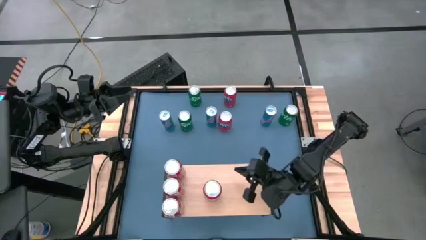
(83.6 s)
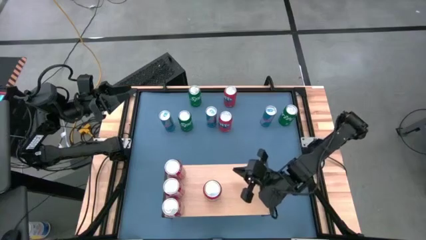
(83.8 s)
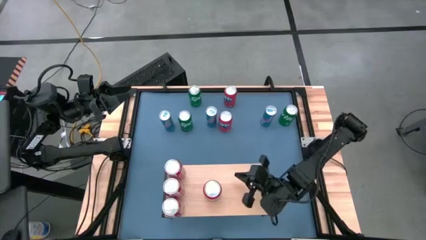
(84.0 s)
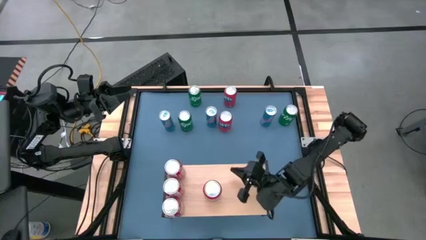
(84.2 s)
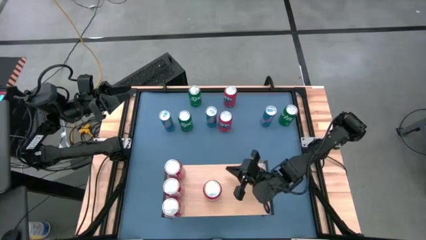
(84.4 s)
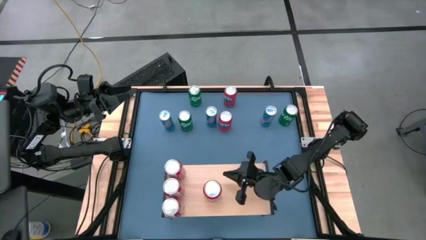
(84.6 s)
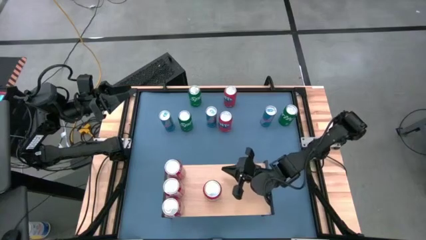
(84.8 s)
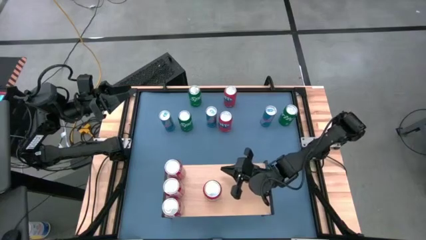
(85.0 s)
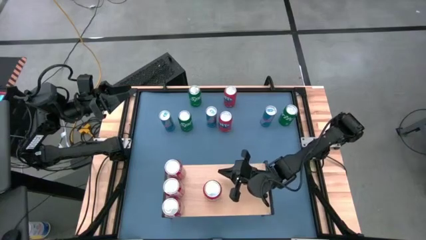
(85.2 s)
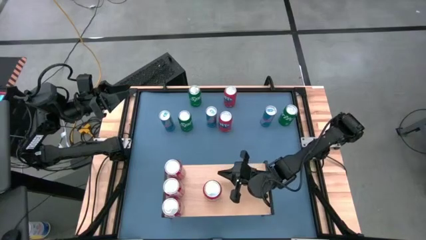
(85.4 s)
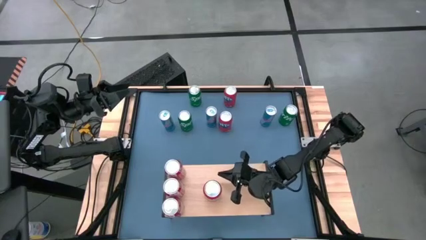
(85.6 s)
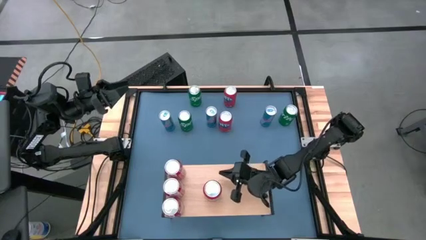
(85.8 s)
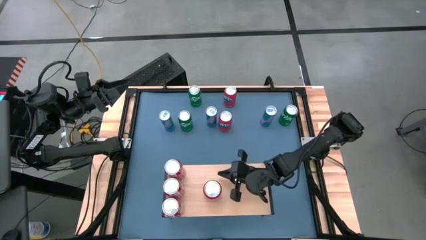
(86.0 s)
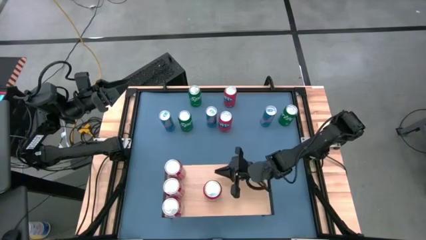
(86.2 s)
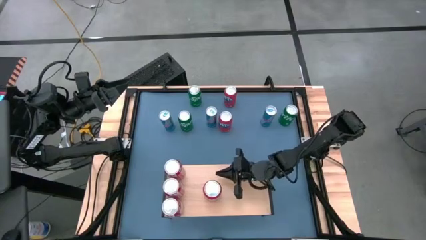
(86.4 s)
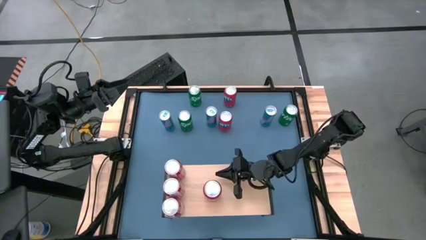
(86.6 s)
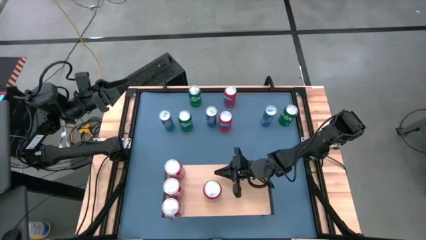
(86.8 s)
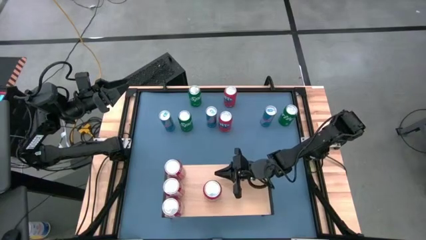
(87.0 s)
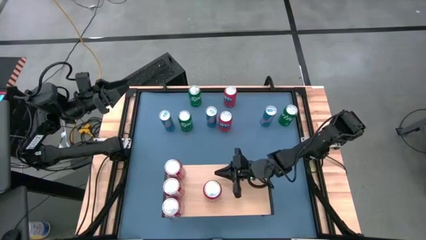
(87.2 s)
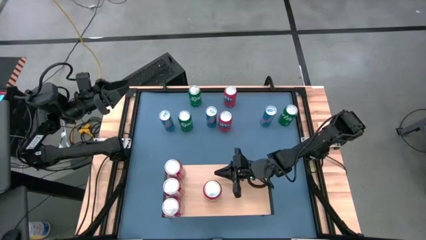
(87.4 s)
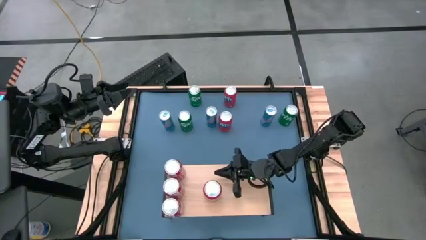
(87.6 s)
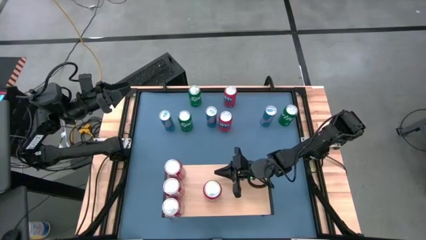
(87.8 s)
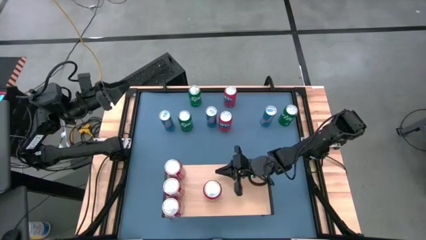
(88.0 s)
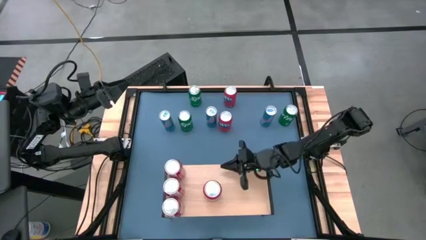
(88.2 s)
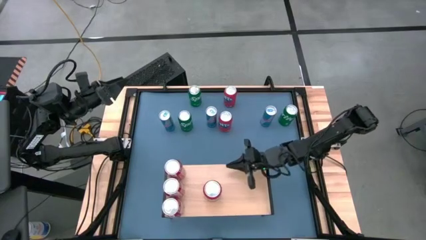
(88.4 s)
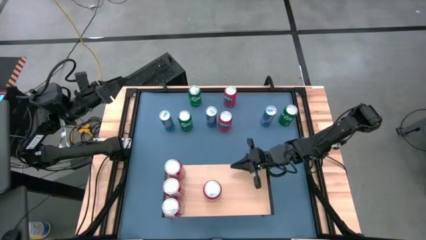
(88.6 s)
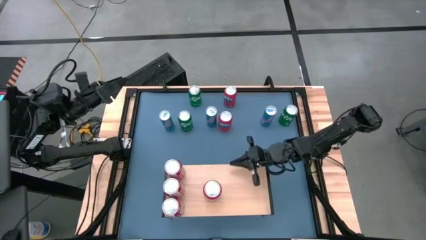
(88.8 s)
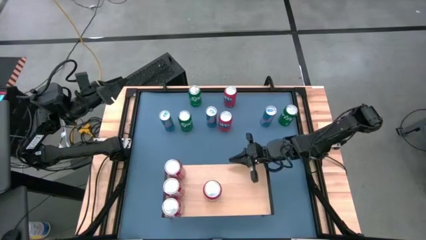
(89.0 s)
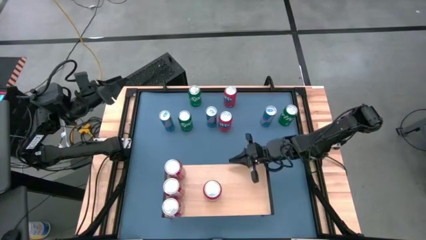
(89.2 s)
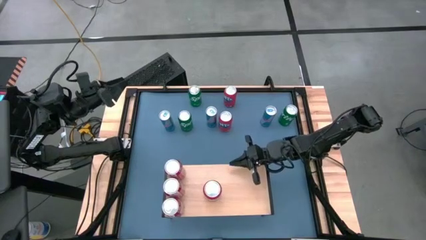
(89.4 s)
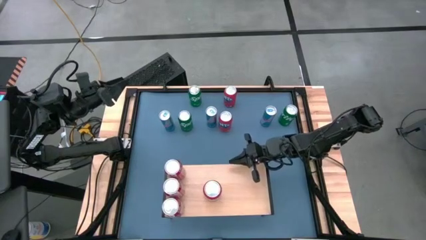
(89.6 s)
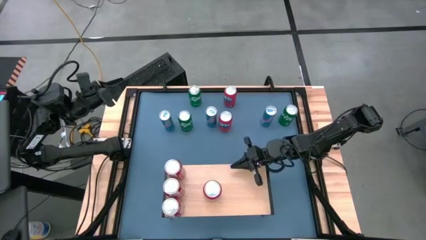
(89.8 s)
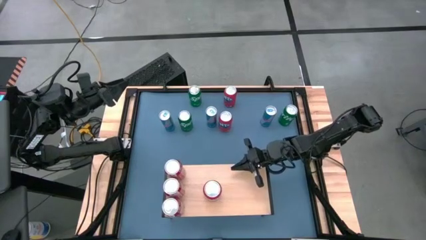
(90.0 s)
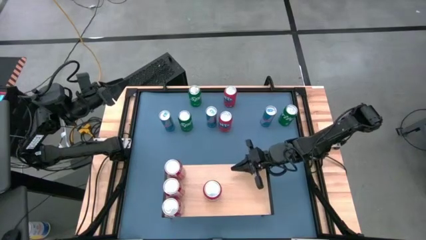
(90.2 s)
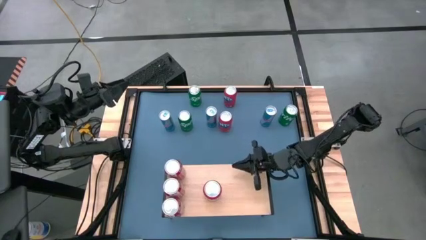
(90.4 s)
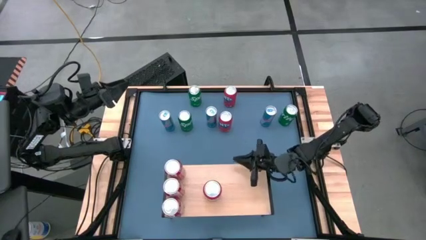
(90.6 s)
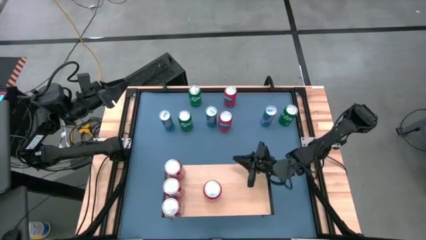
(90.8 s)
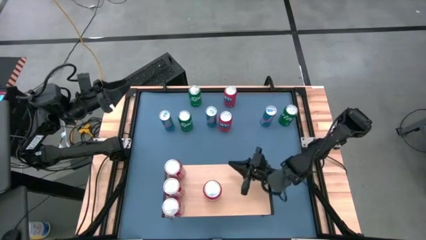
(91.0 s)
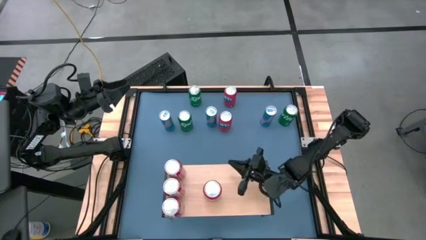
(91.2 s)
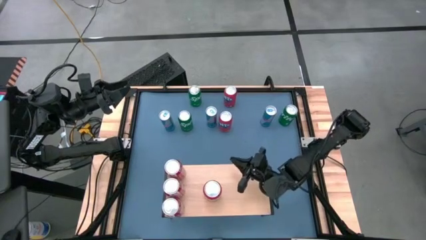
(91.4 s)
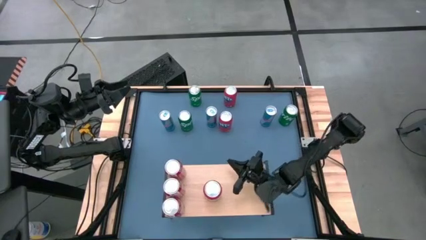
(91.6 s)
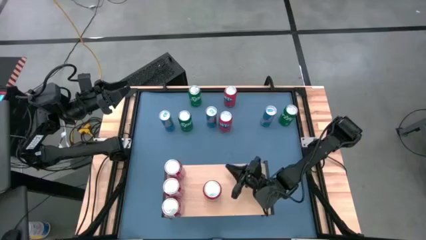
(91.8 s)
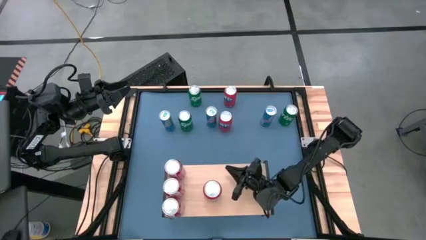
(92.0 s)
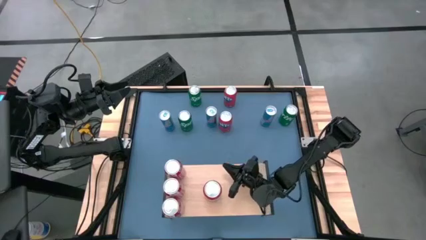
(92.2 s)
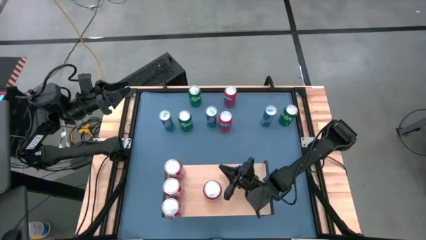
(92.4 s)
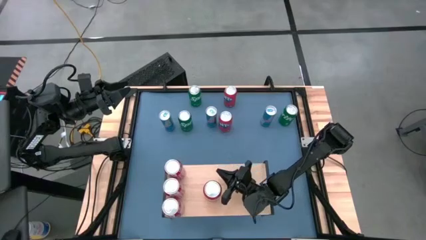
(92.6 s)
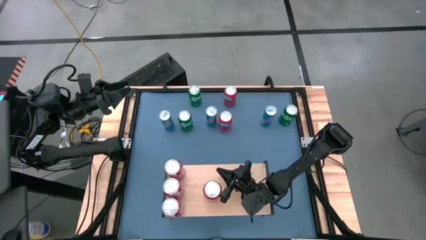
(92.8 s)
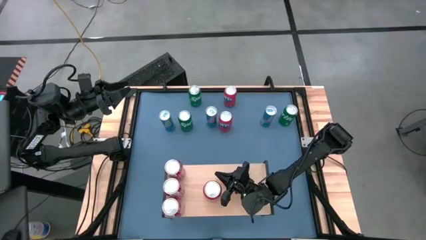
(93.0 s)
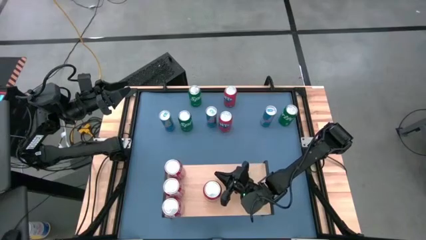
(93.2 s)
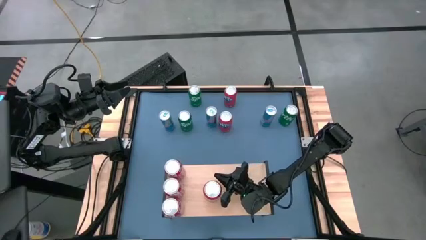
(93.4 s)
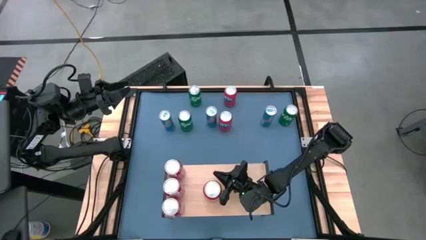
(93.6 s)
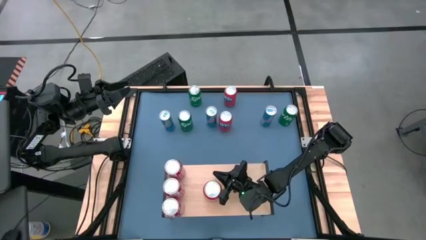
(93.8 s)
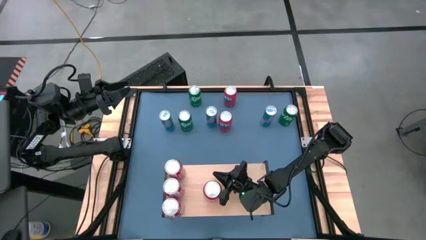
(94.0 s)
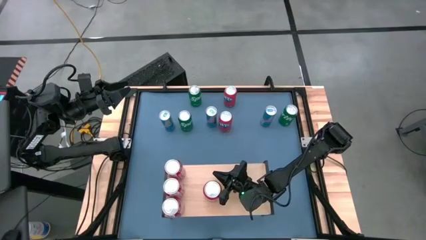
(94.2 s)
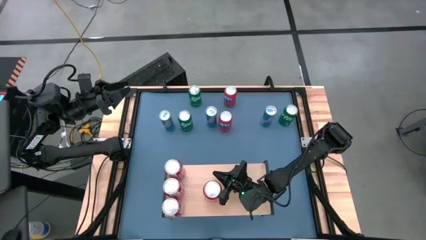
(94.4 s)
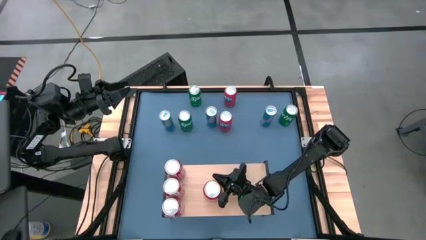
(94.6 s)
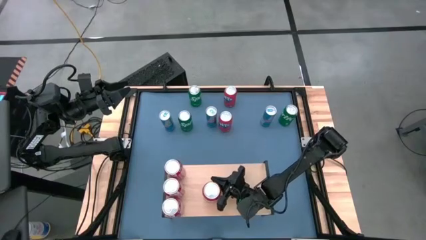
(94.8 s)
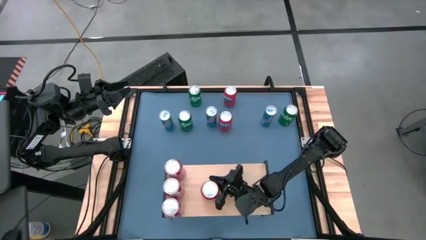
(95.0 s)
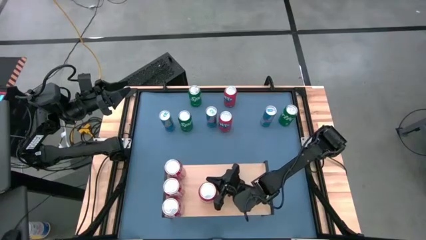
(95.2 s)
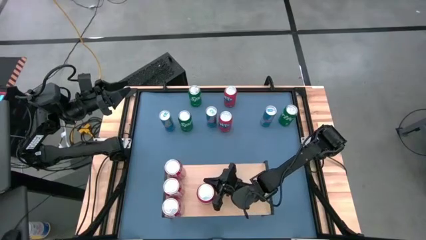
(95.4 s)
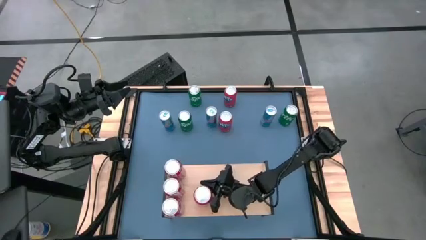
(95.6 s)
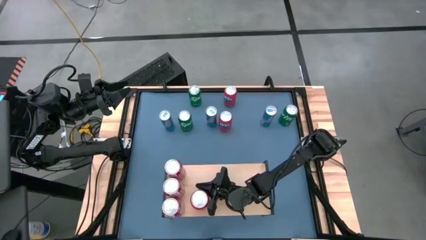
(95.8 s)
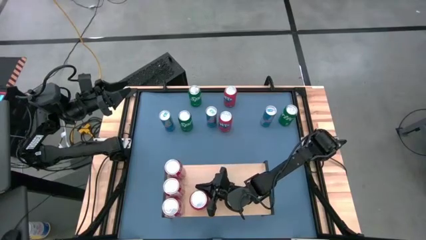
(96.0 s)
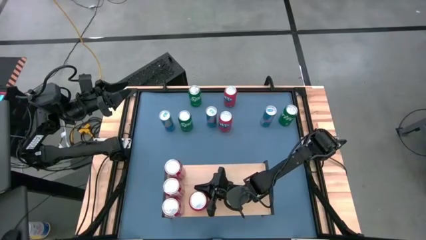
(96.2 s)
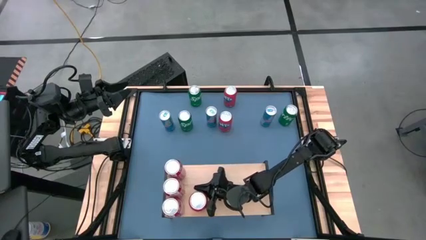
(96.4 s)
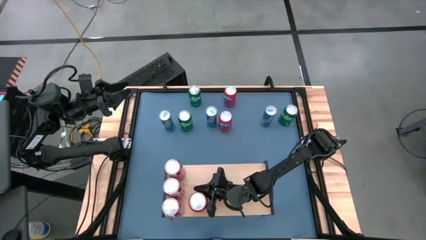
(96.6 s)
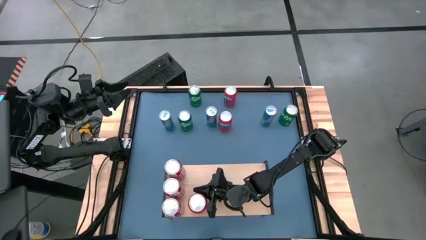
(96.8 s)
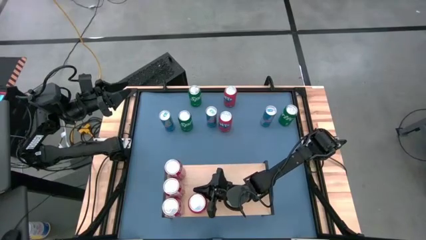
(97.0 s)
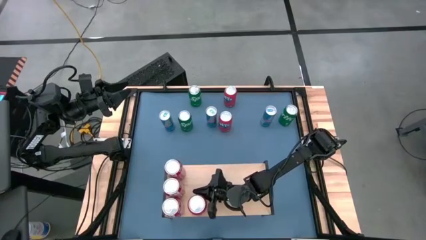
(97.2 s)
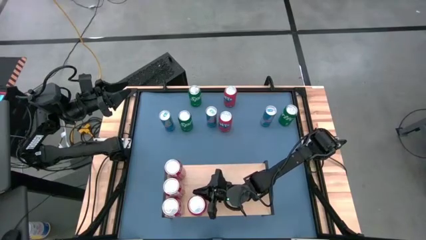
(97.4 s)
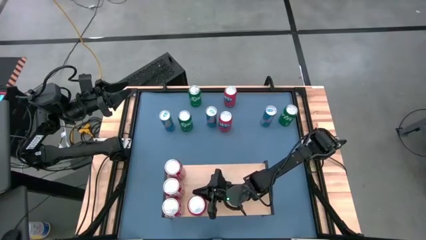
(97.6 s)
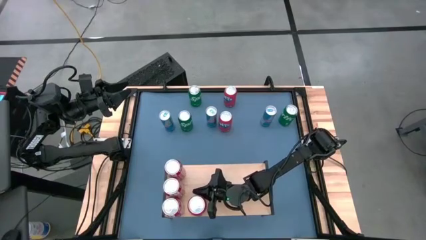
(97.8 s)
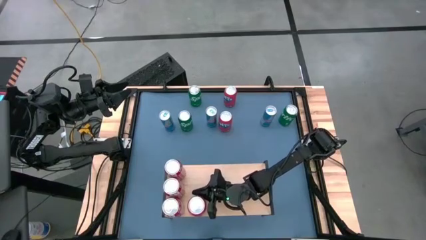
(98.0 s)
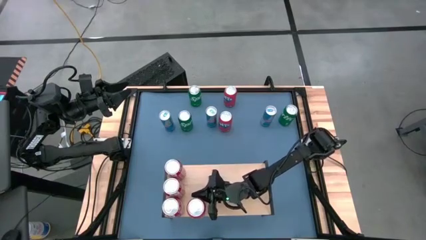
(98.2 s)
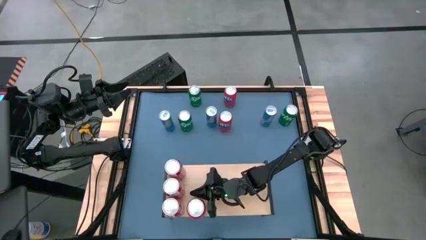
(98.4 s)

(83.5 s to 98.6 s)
Task: Place canned beverage on shelf
Put the right orange soda can on the shelf
